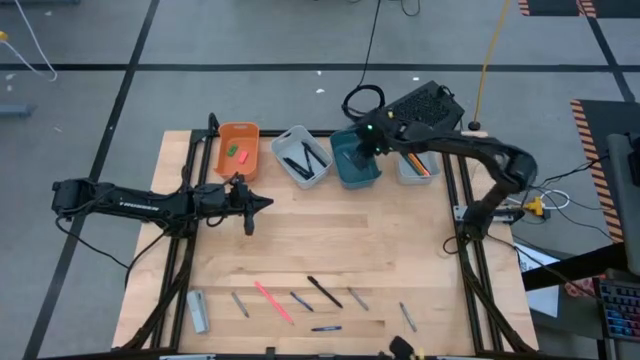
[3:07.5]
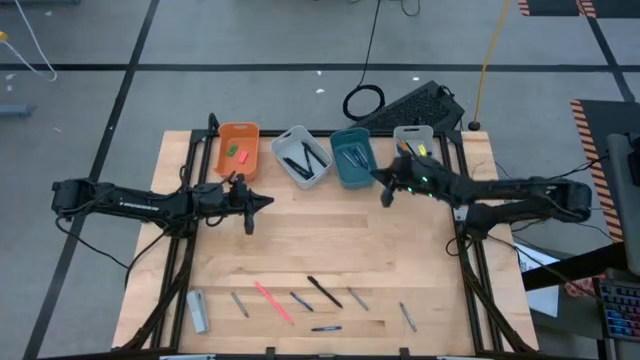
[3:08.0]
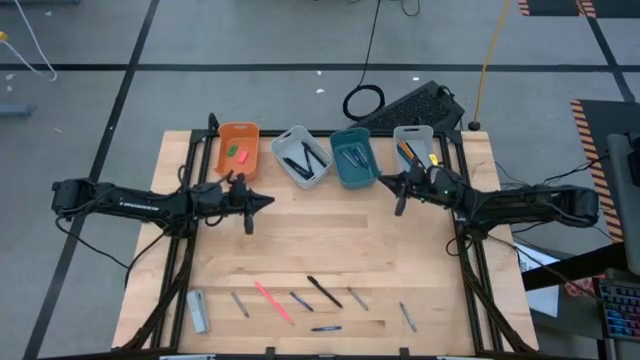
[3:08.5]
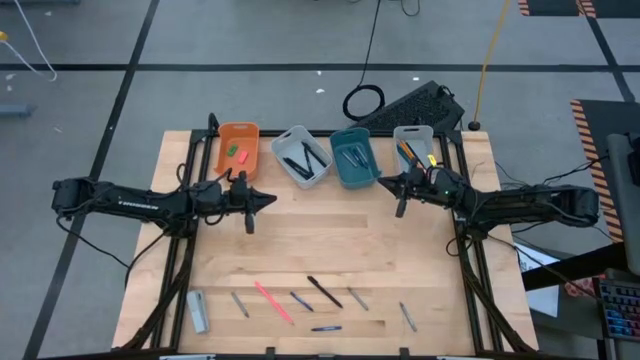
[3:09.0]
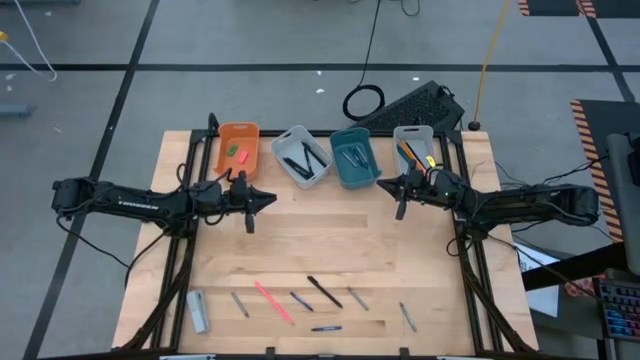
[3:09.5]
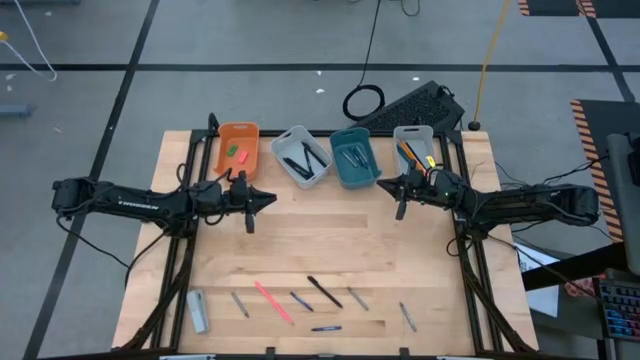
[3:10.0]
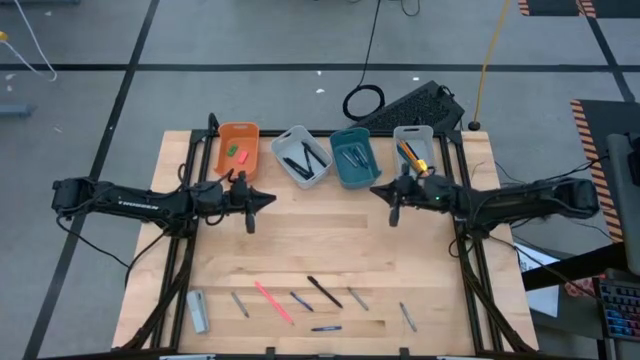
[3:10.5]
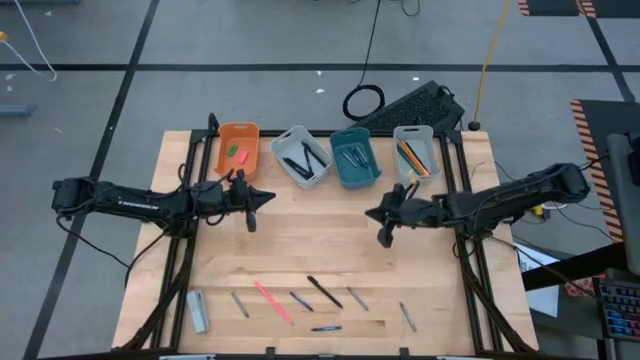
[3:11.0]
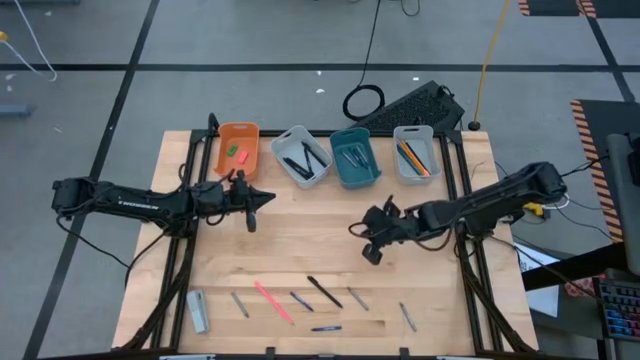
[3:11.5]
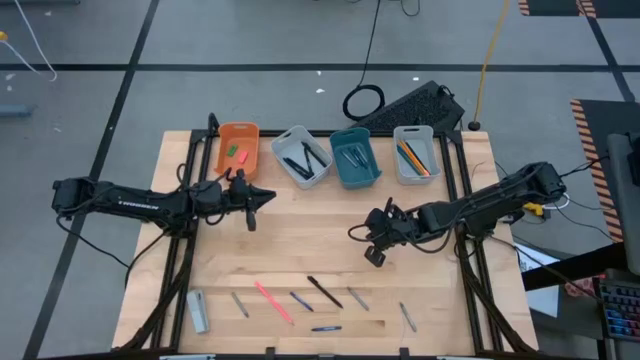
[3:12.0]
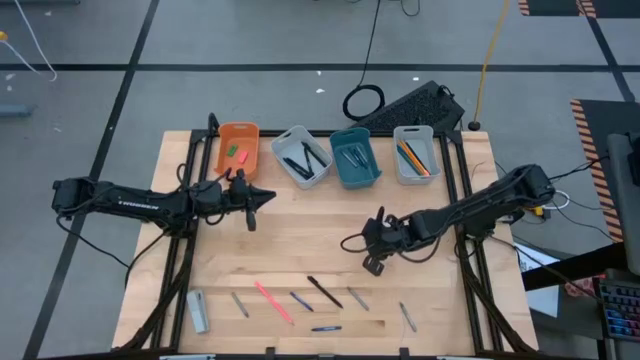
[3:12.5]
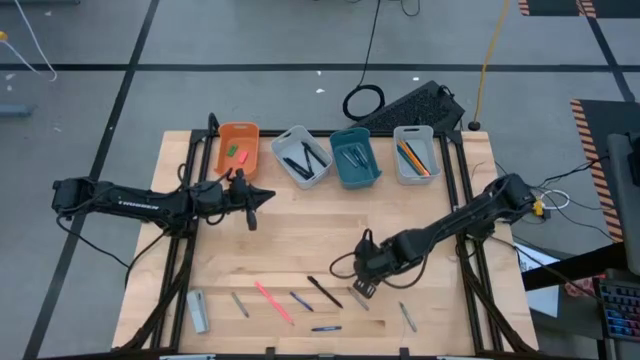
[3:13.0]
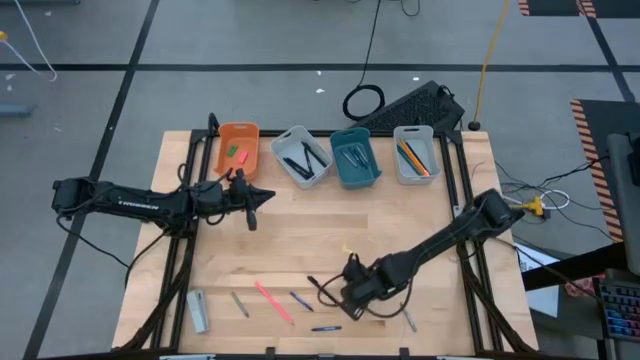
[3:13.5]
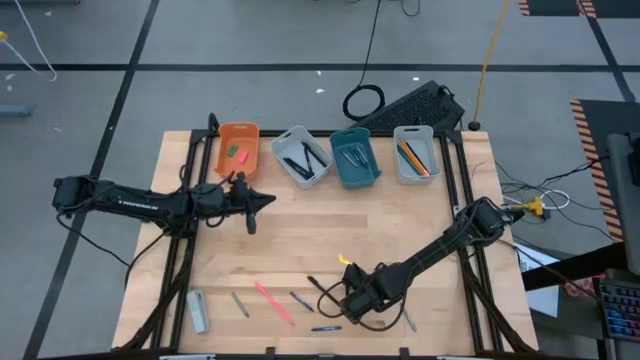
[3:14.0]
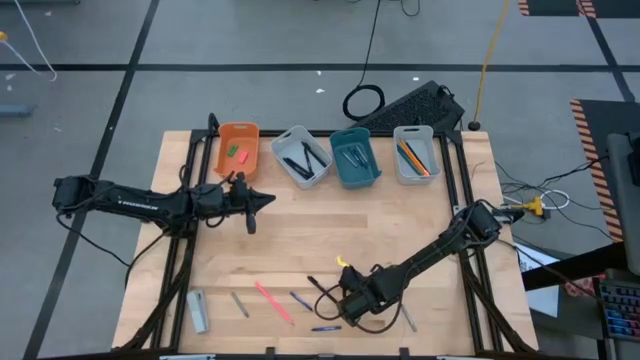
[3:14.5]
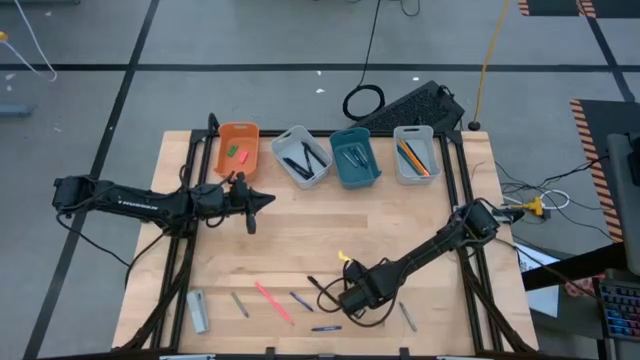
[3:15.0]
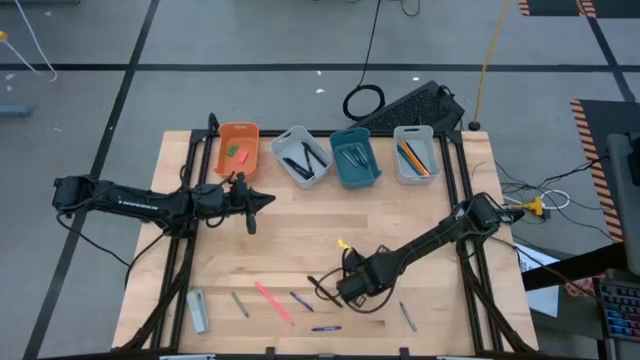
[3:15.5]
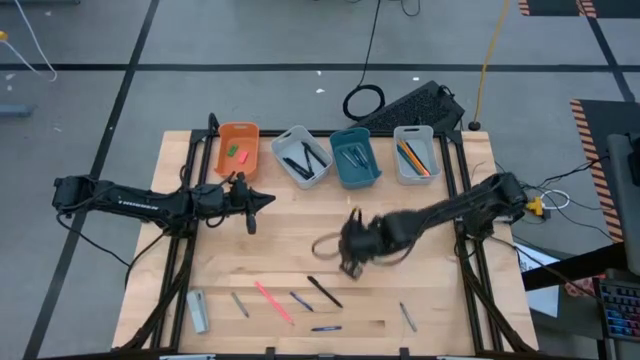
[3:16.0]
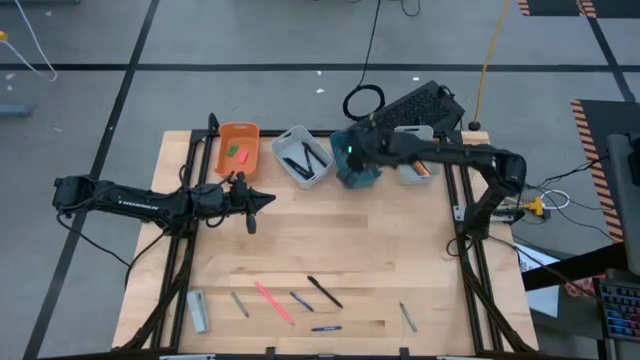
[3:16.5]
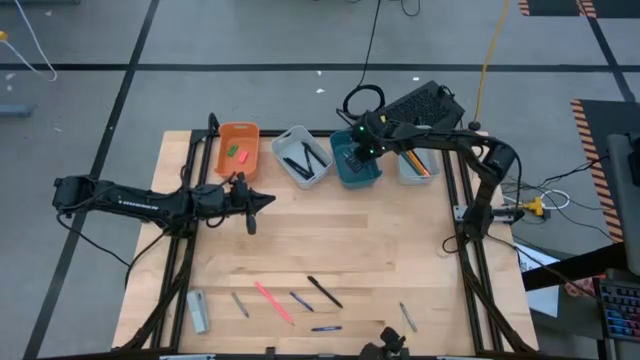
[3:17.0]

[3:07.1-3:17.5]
Task: Sort crayons/erasers/pens/pencils in bins
Put the gray crayon into the blue bin

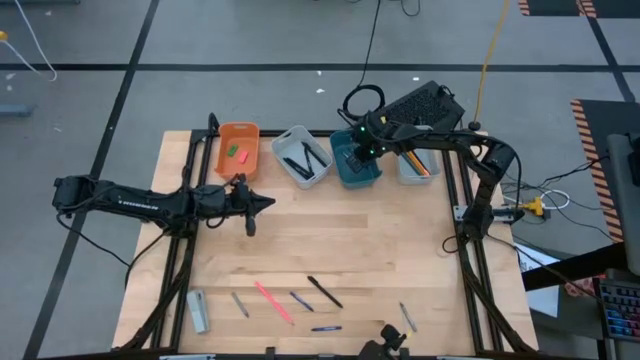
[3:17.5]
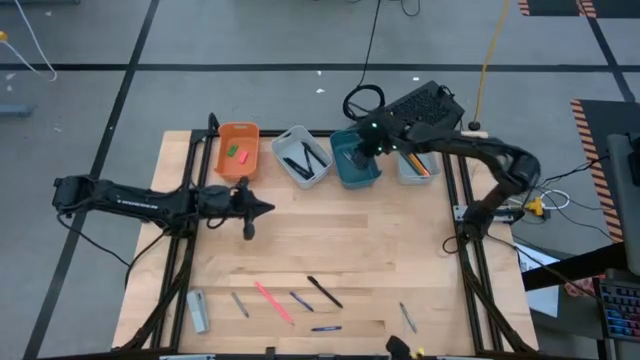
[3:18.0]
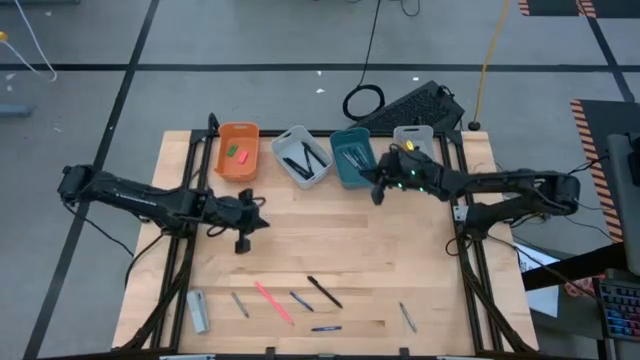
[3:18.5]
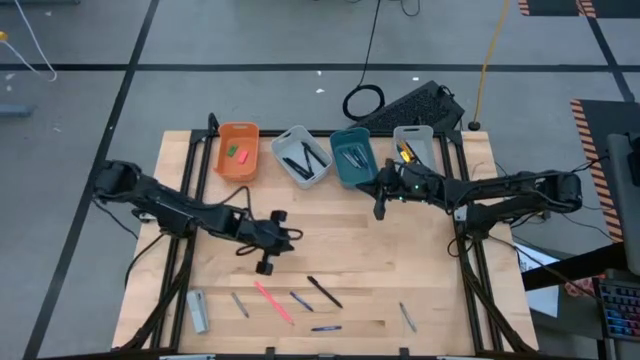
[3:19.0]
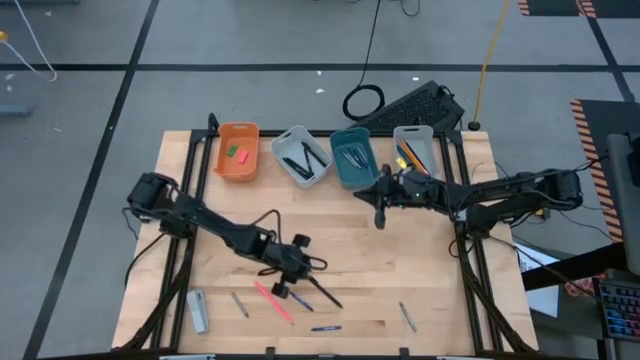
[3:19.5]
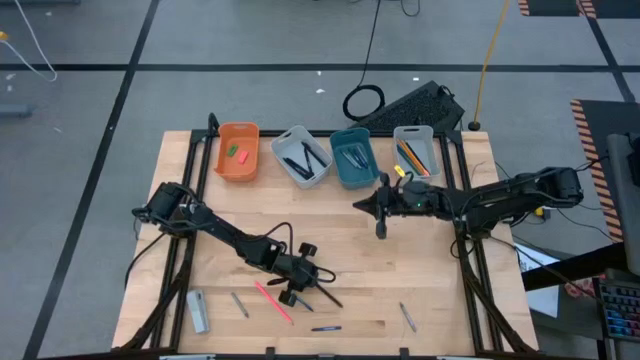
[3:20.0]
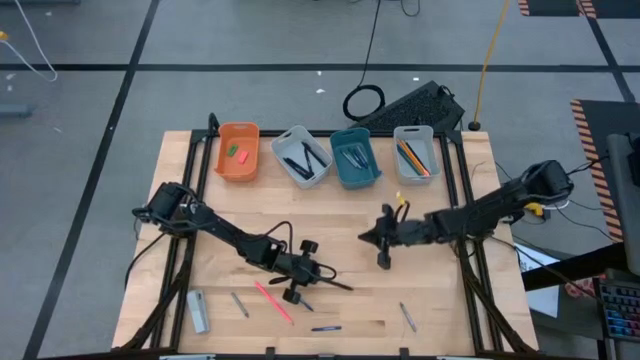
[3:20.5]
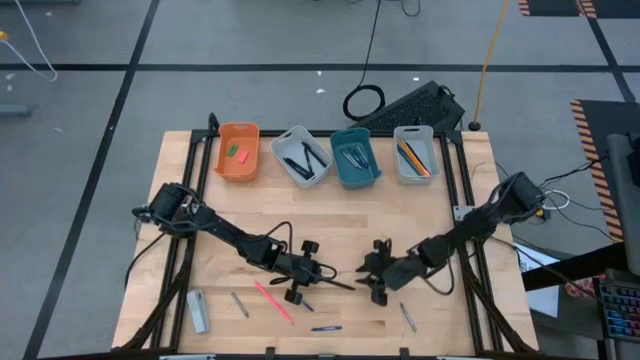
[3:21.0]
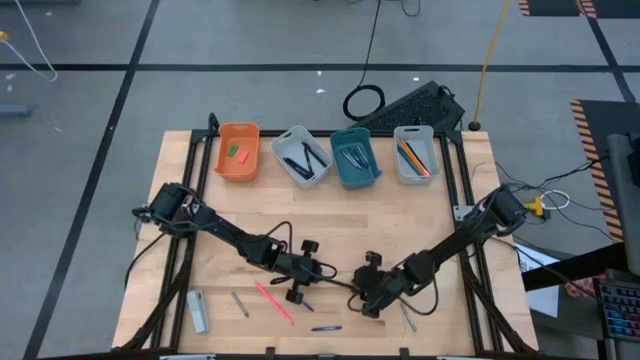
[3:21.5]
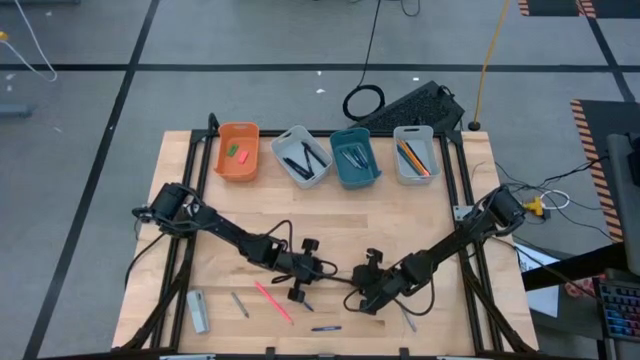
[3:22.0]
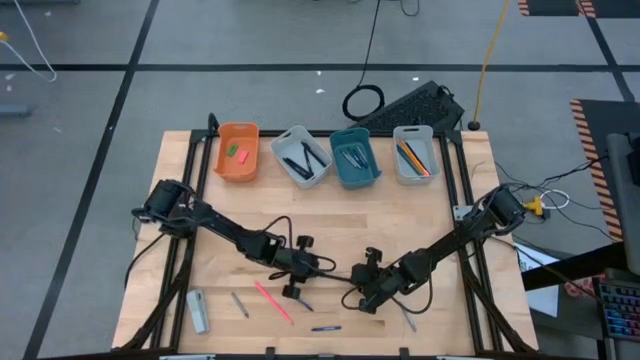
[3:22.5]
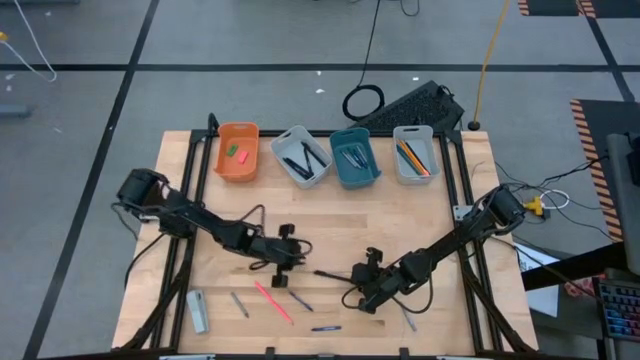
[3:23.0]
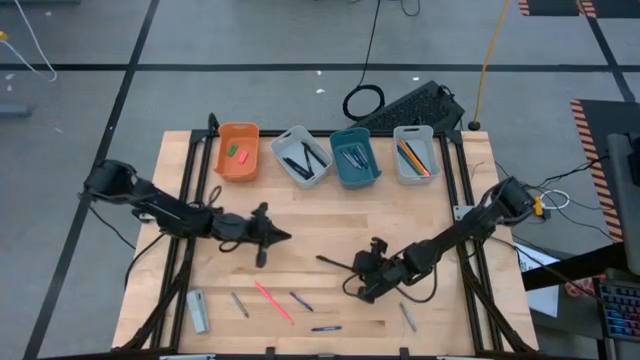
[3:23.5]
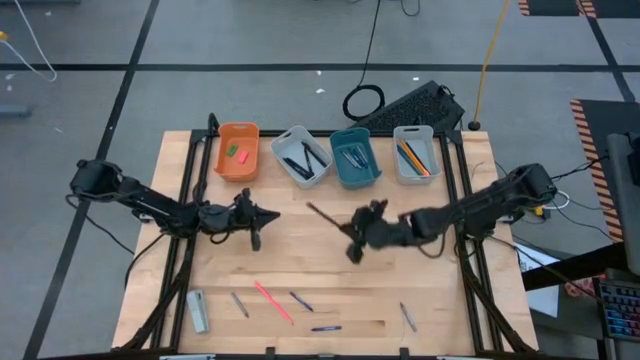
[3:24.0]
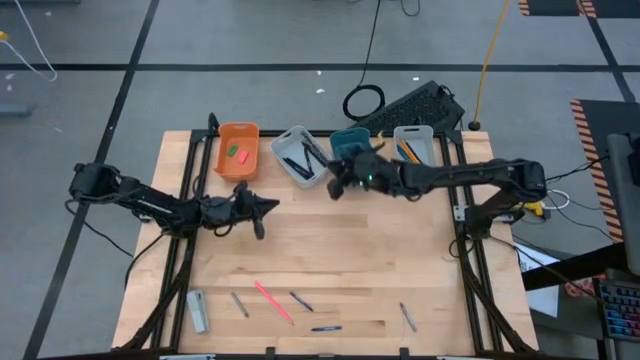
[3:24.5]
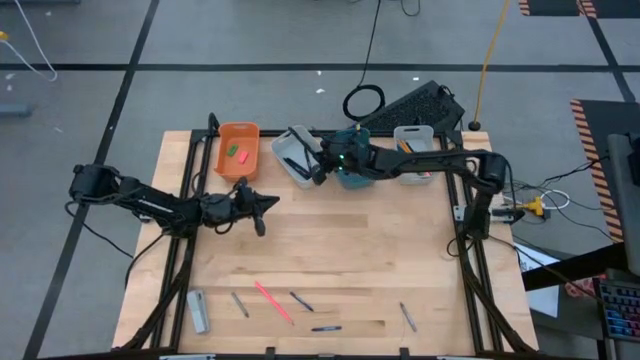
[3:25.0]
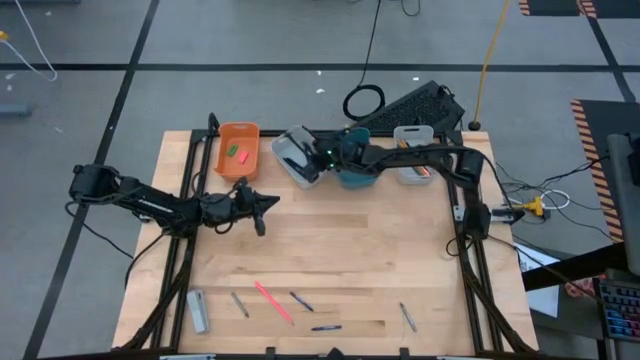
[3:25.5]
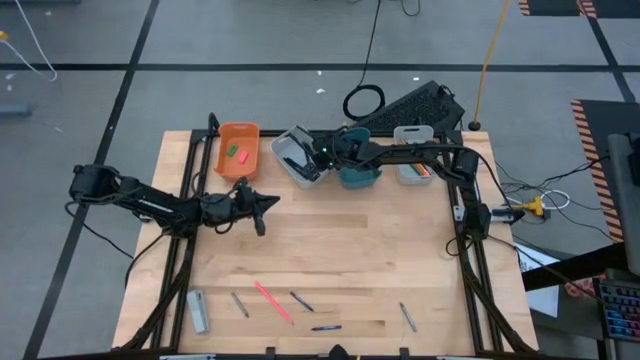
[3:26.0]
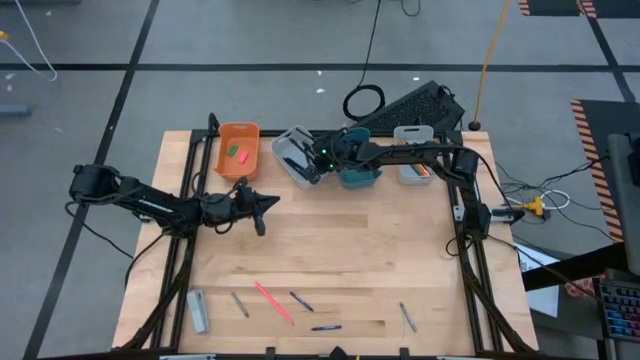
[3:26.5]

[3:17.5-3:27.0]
Put the black pen into the left gray bin

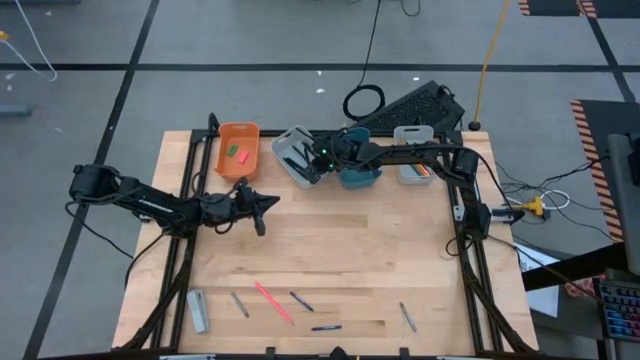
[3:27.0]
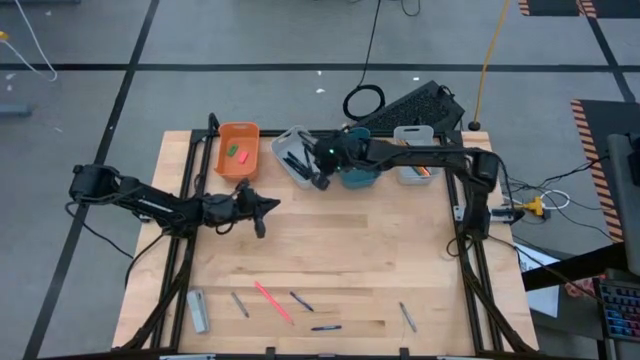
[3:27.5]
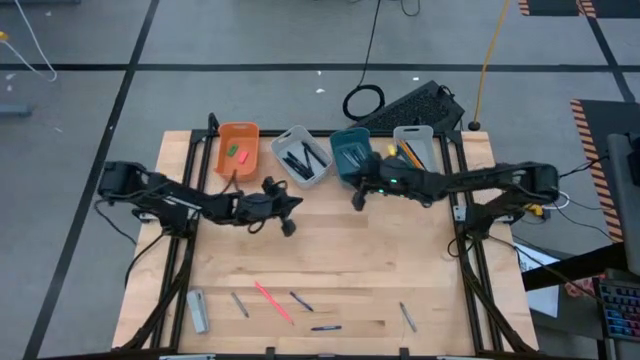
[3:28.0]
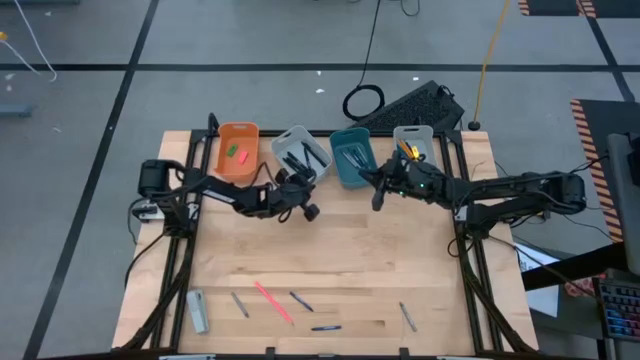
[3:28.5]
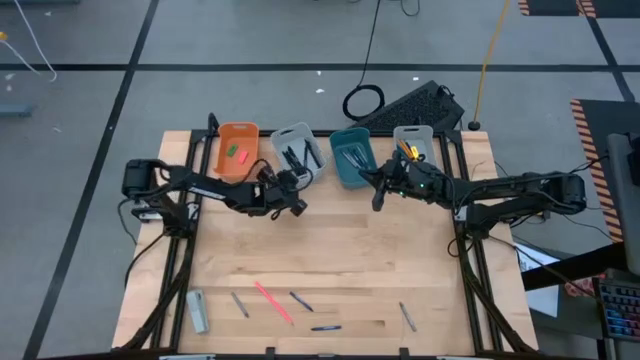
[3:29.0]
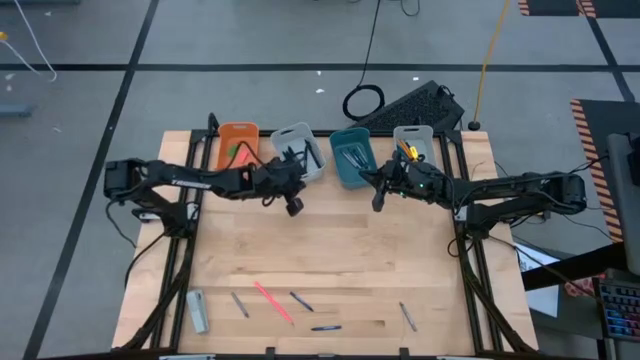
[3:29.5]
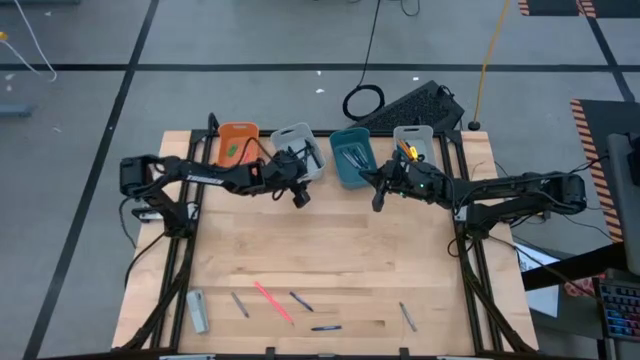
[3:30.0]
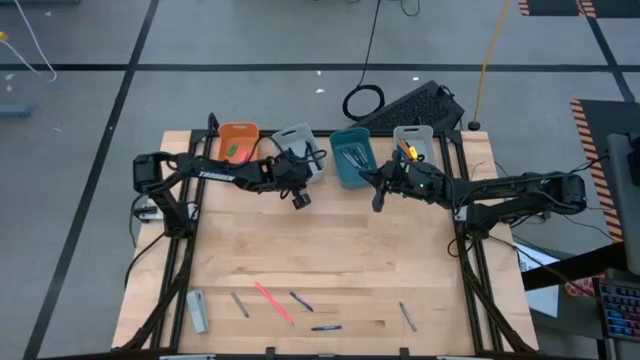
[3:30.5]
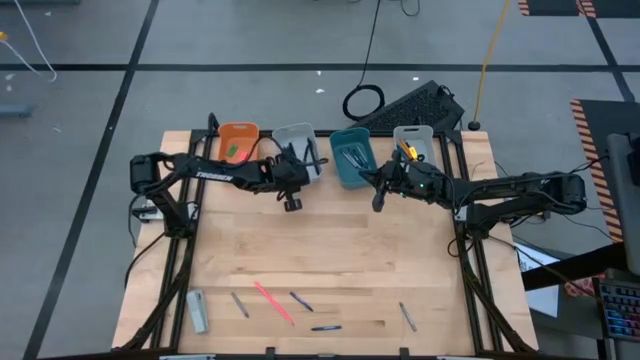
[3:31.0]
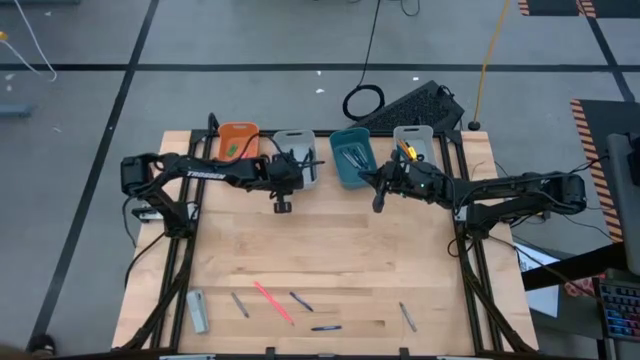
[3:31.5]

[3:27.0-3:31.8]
Adjust the left gray bin
